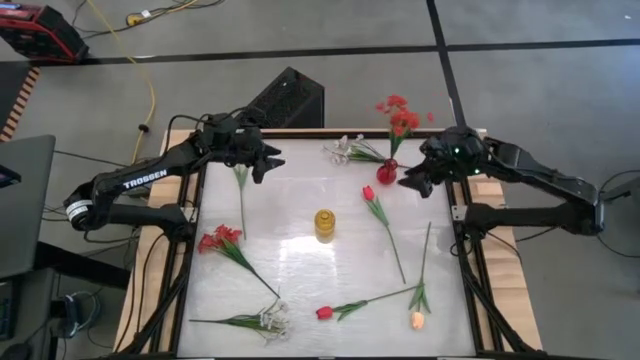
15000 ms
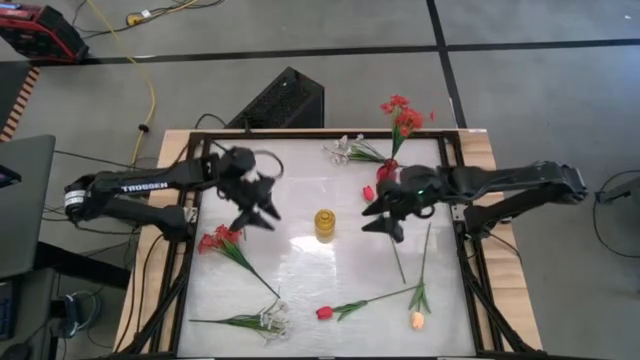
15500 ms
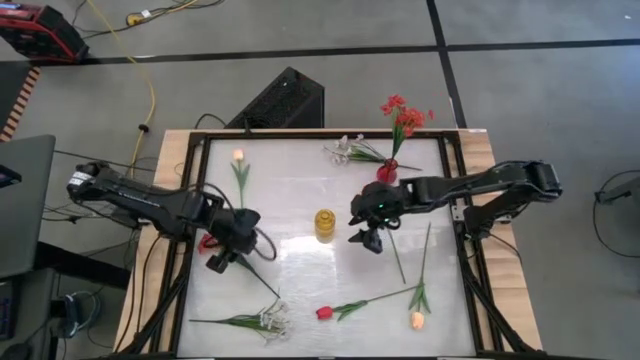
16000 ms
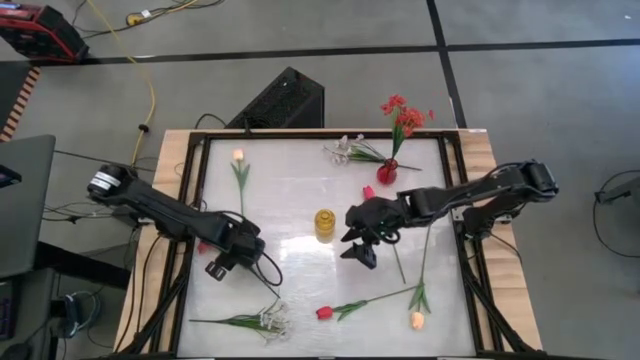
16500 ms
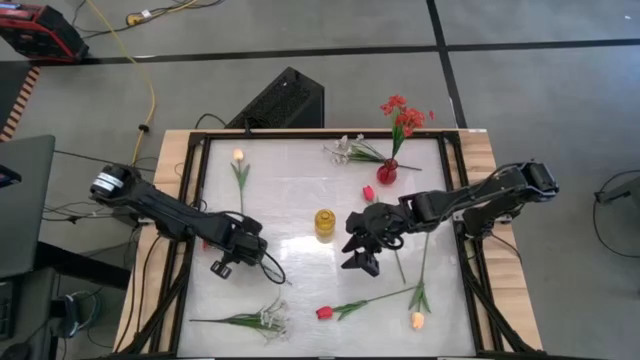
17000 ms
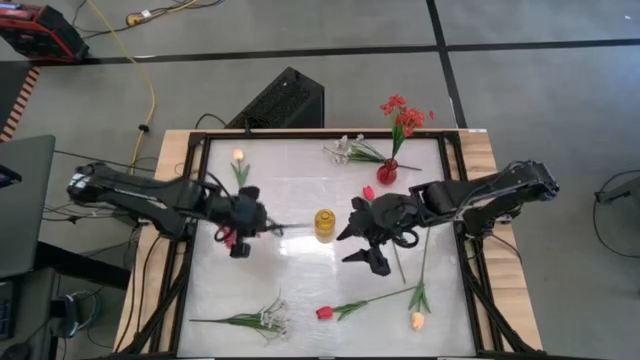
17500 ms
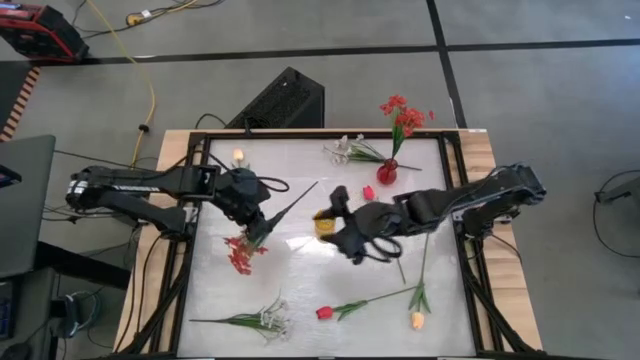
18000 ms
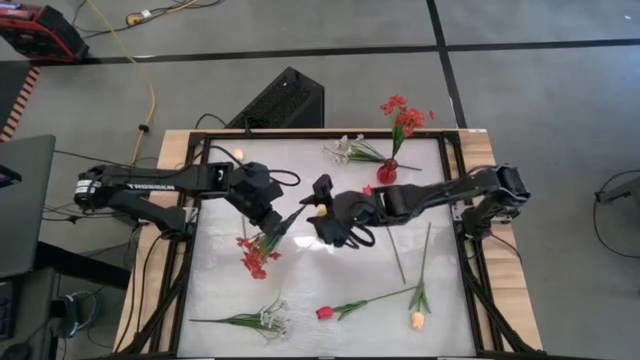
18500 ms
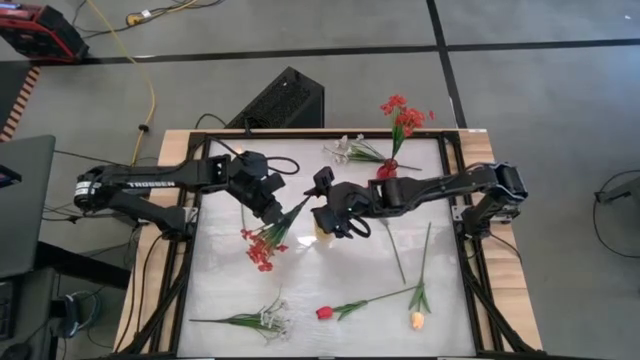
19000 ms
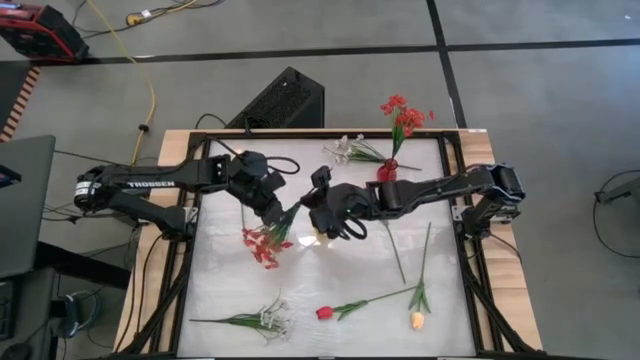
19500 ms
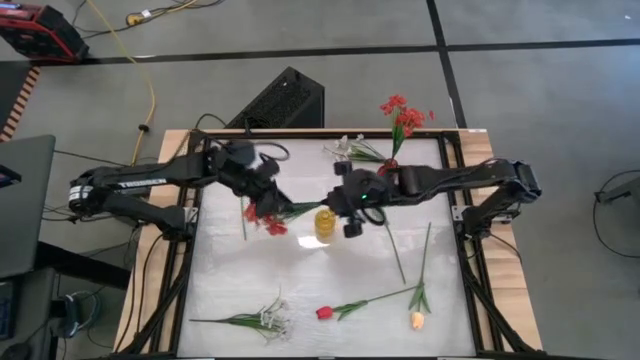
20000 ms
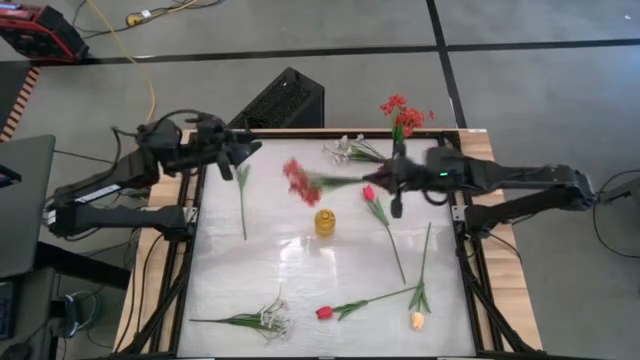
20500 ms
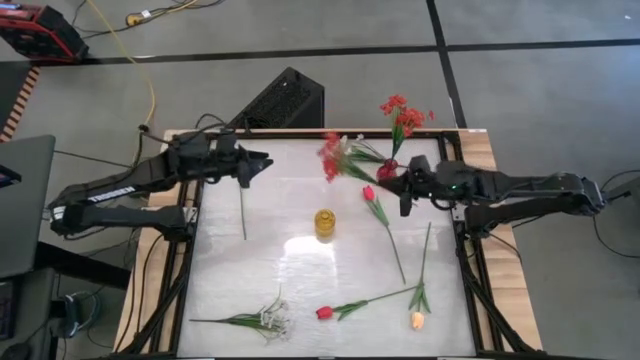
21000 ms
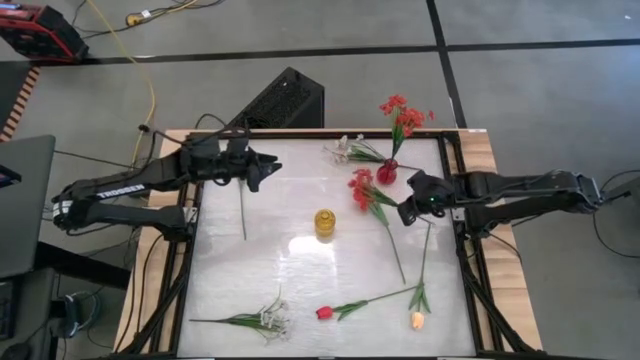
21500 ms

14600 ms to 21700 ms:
Task: Sort flowers into vase by color
Put the red flowers into the red vase

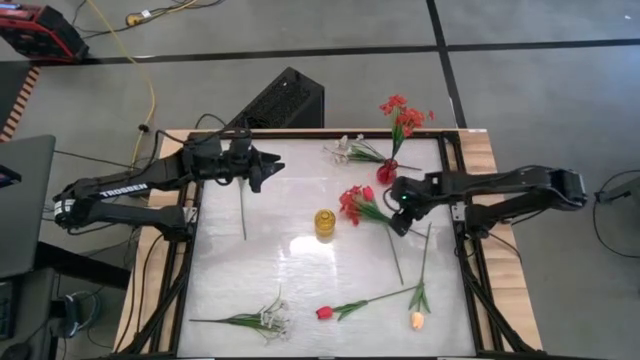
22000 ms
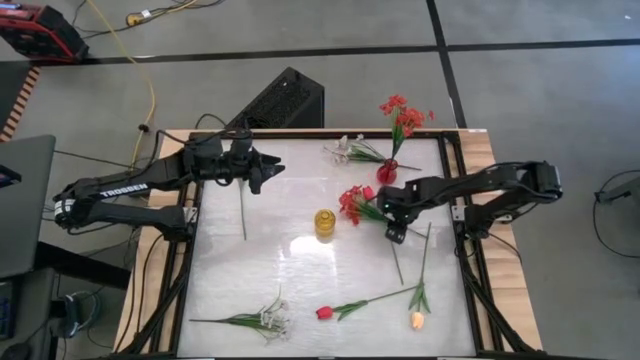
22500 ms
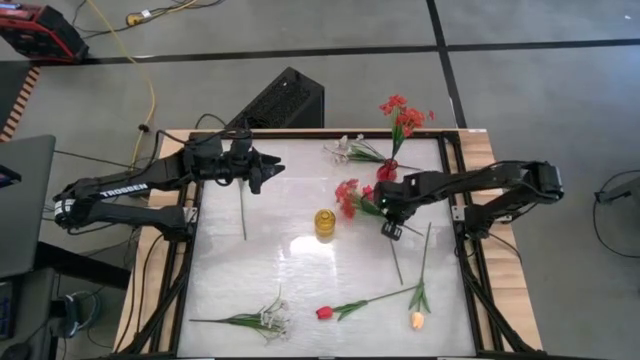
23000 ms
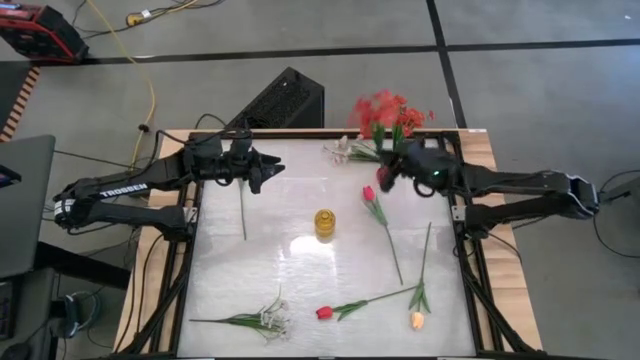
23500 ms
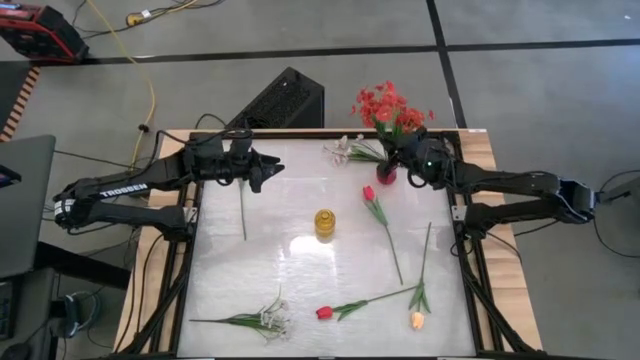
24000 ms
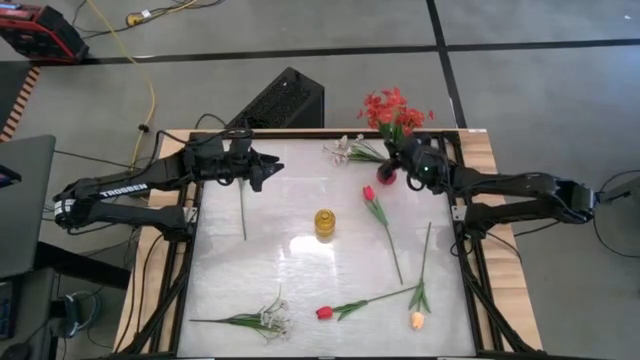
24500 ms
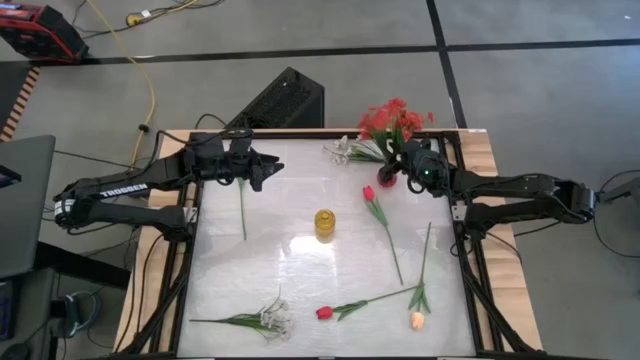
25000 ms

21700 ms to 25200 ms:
Put the red flowers into the red vase

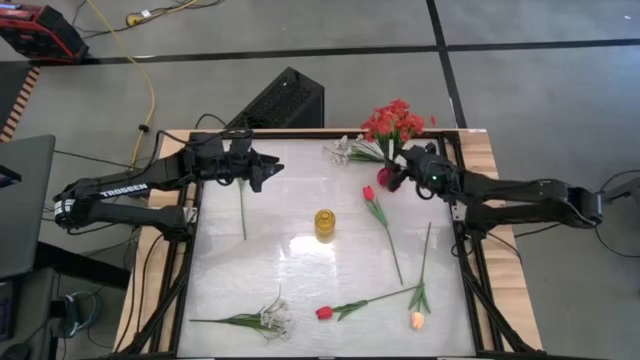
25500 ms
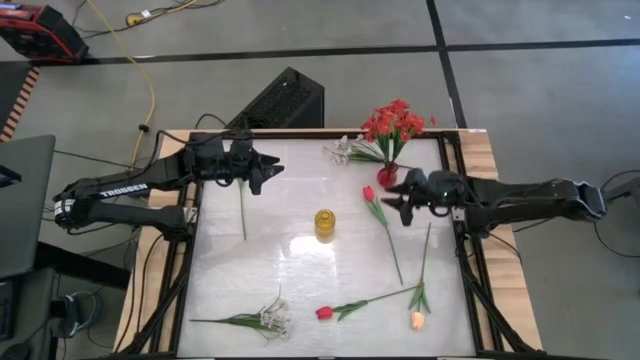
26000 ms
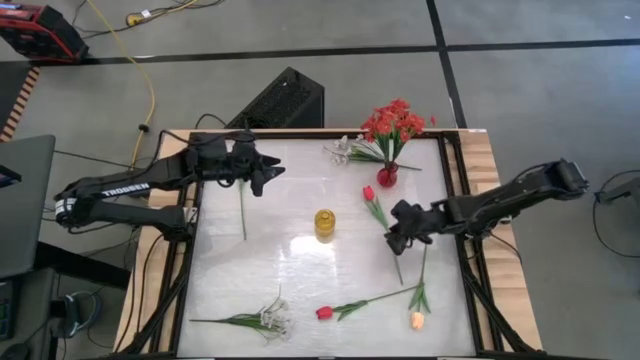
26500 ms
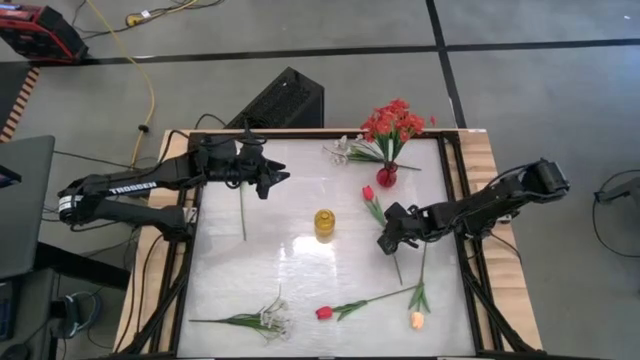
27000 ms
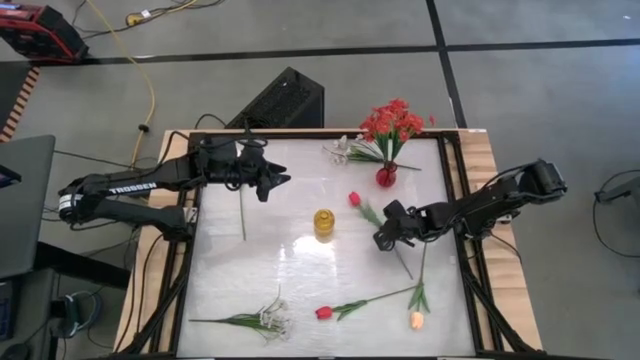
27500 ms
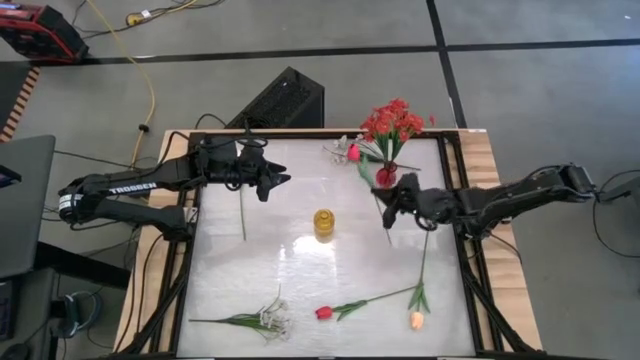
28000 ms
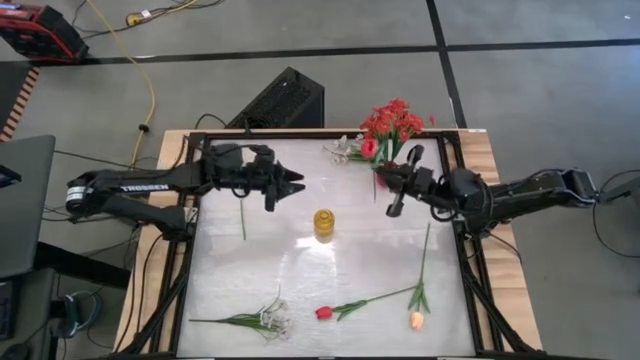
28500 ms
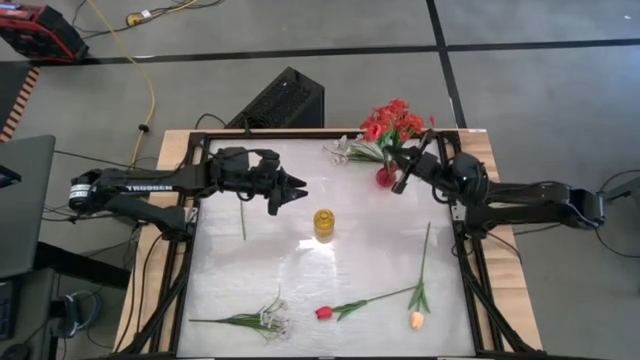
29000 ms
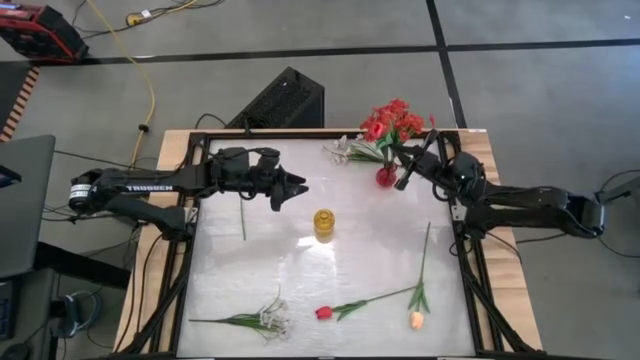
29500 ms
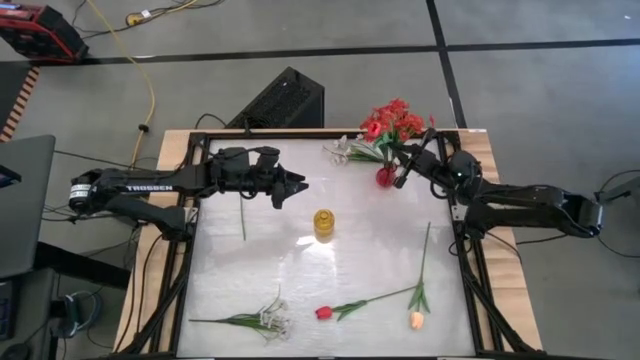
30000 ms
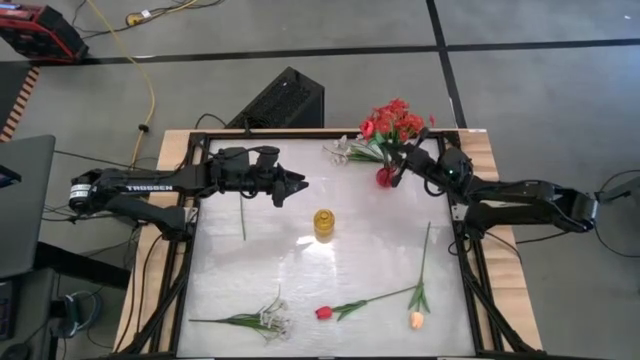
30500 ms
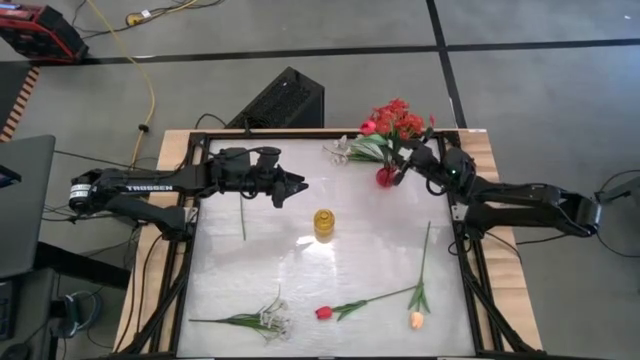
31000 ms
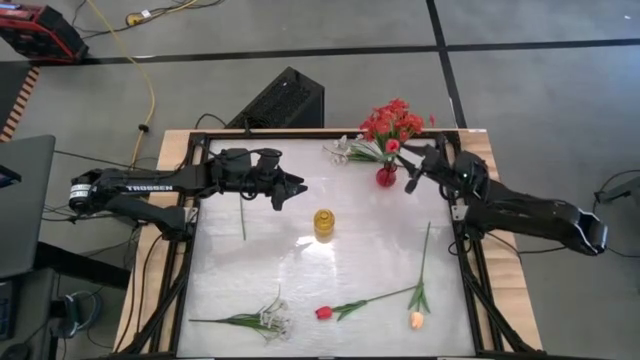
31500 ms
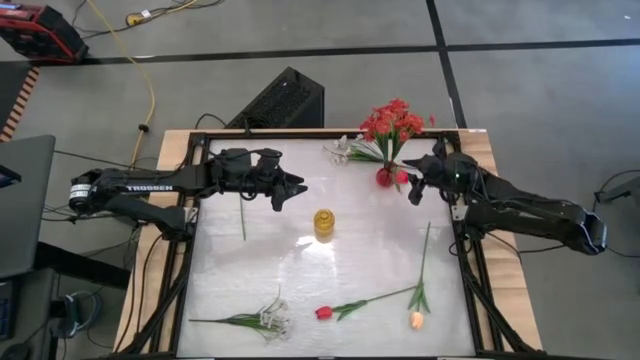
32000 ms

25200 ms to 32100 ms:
Put the top red flower into the red vase

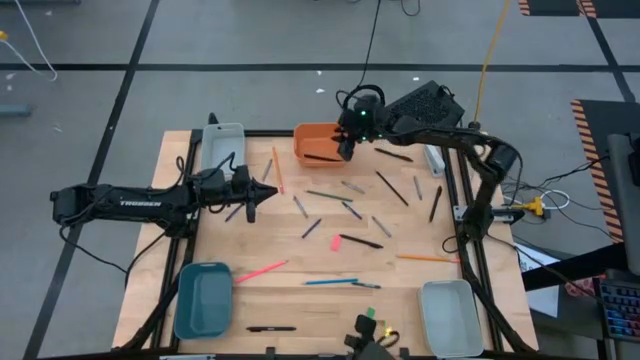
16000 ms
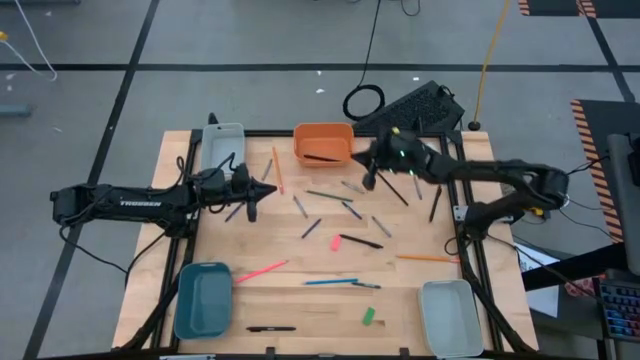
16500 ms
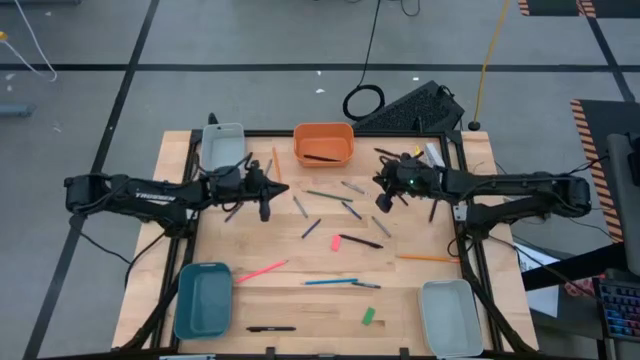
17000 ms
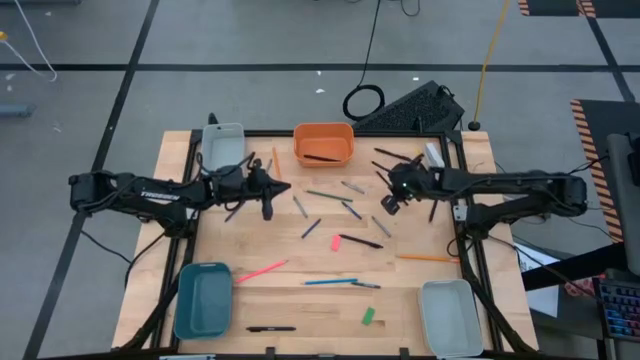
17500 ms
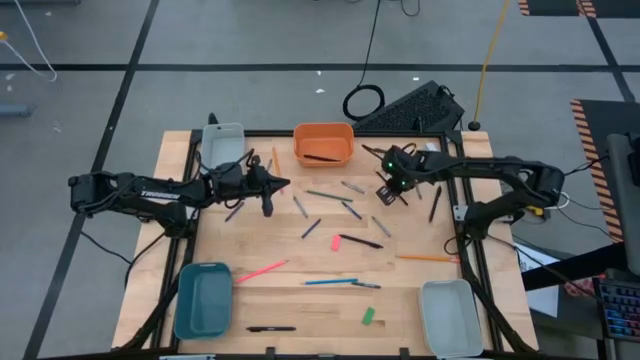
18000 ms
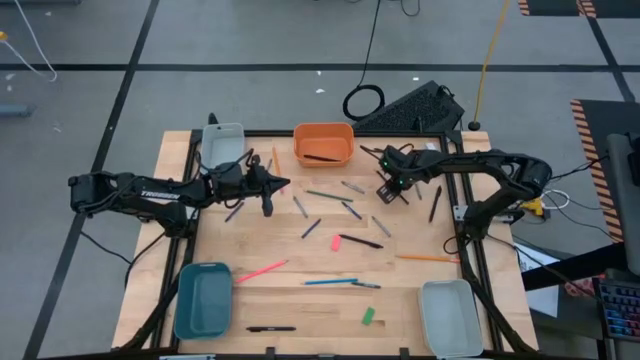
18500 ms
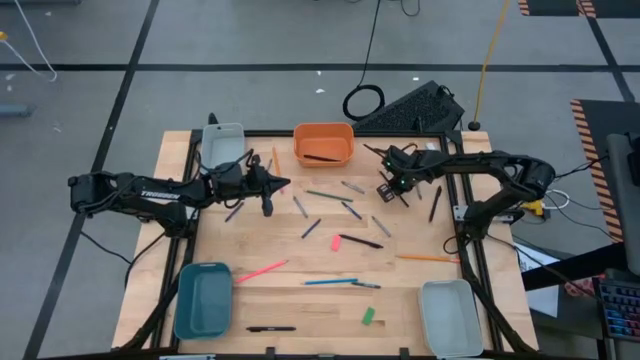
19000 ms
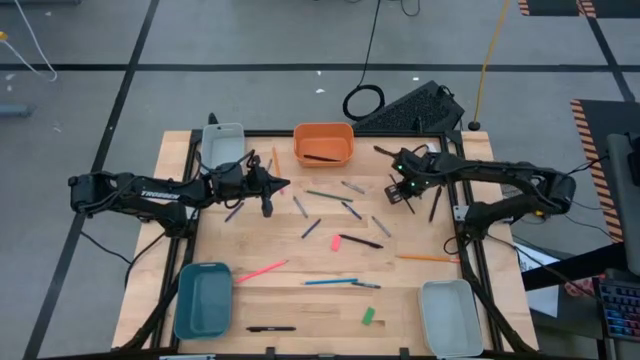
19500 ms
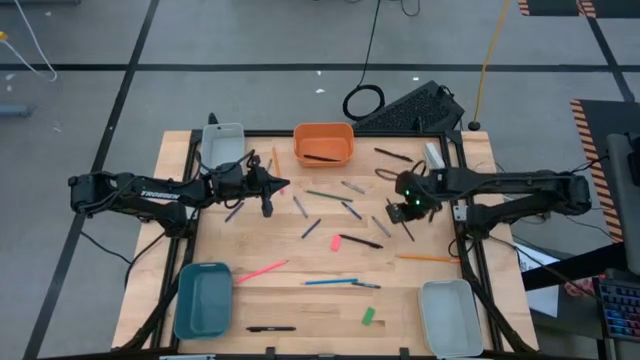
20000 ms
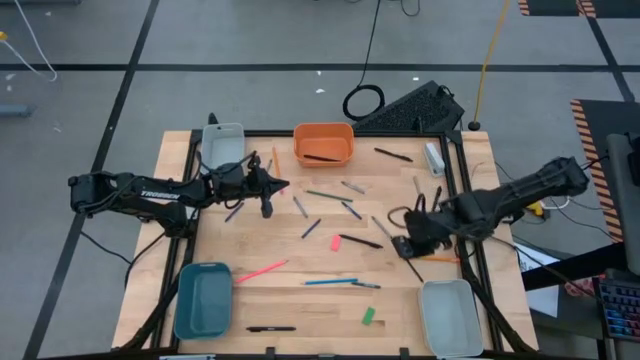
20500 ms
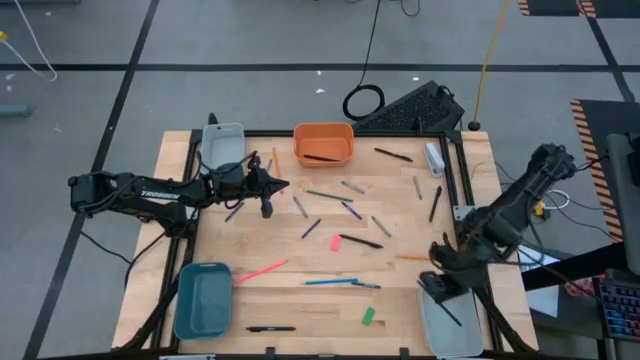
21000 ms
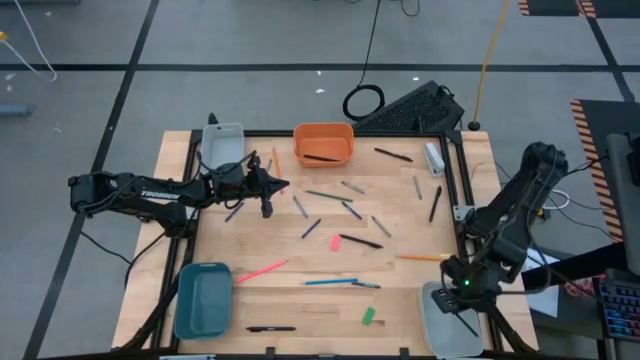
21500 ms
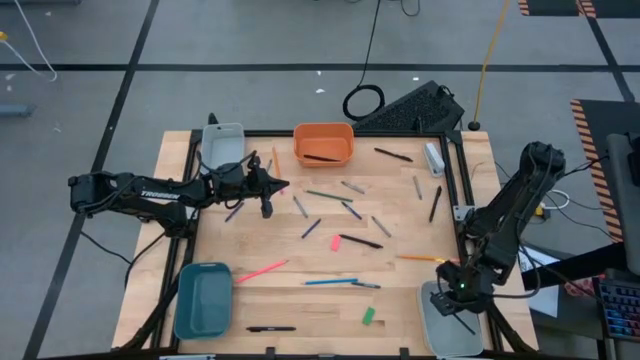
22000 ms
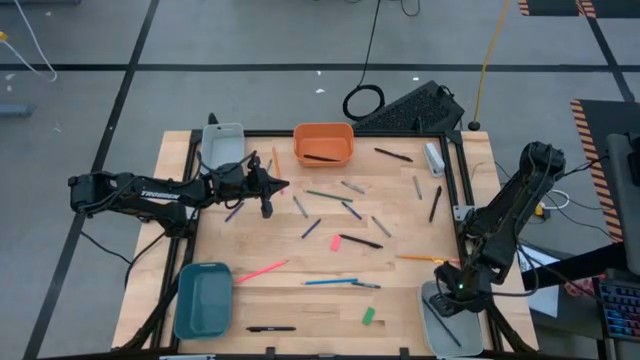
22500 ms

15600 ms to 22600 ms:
Task: Sort crayons/erasers/pens/pencils in bins
Put the dark blue pencil into the bottom gray bin
